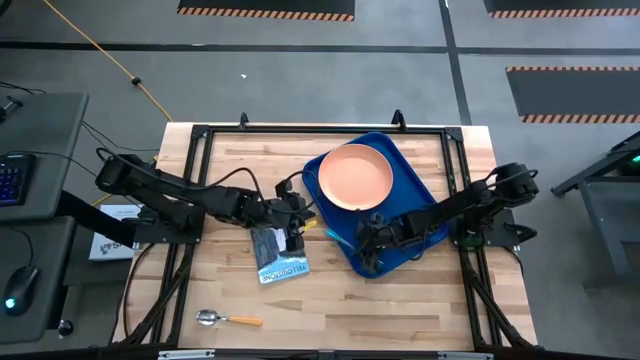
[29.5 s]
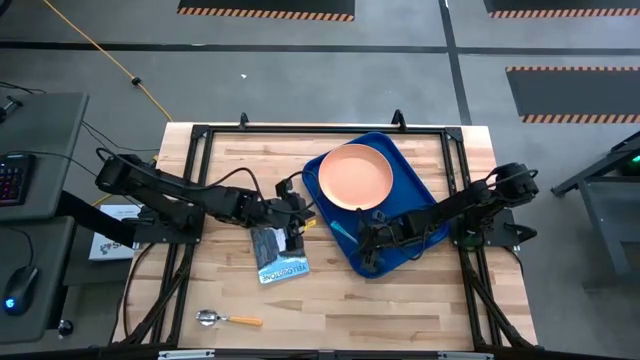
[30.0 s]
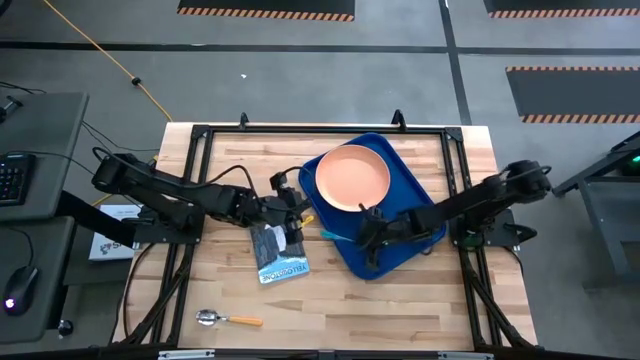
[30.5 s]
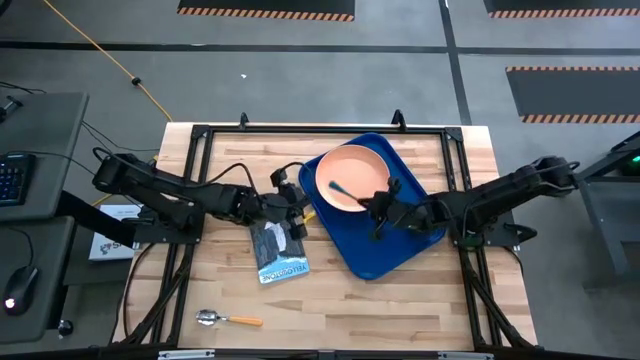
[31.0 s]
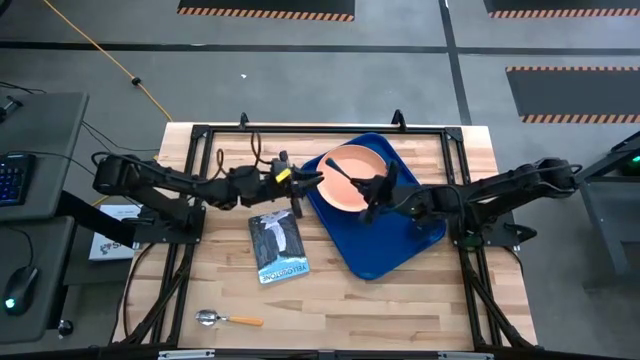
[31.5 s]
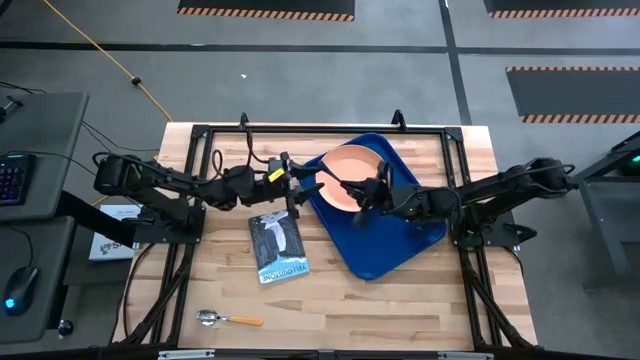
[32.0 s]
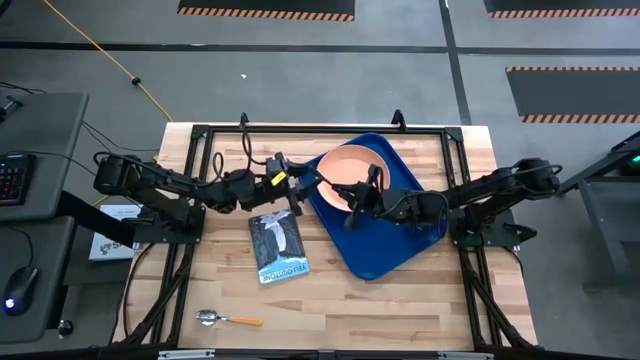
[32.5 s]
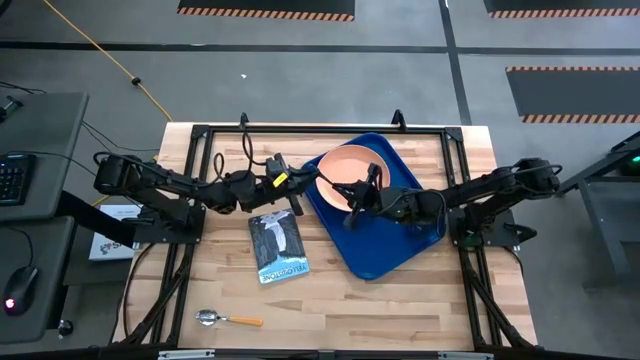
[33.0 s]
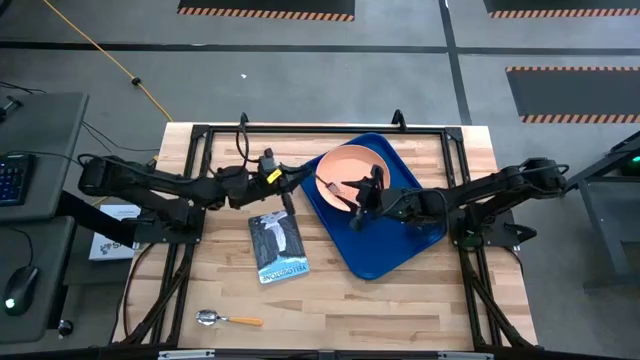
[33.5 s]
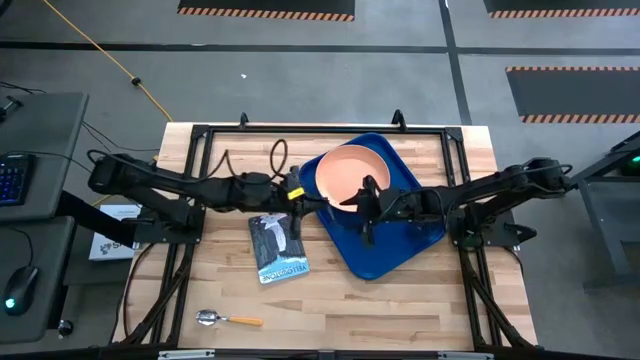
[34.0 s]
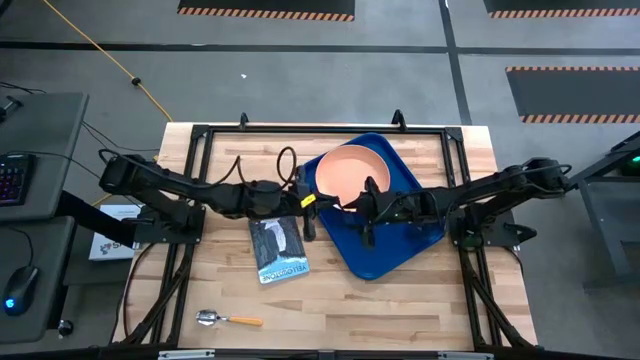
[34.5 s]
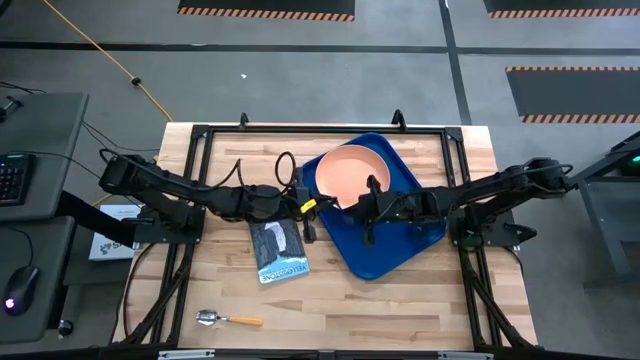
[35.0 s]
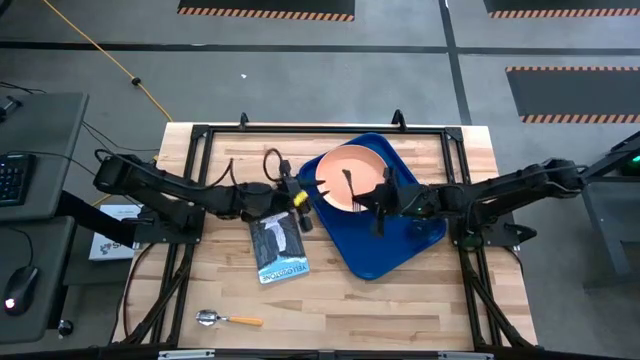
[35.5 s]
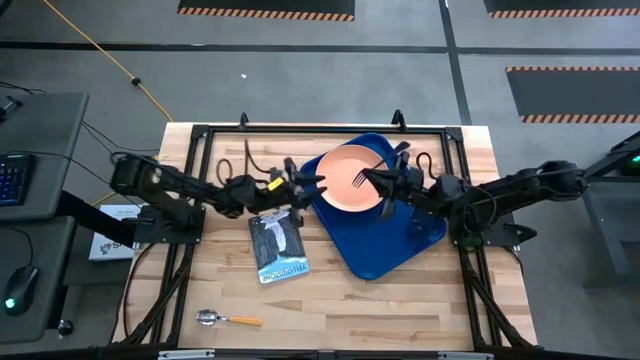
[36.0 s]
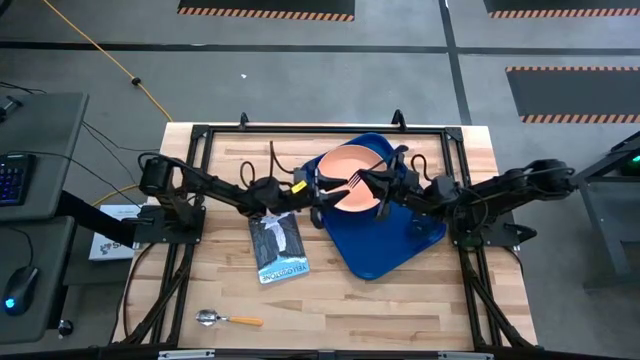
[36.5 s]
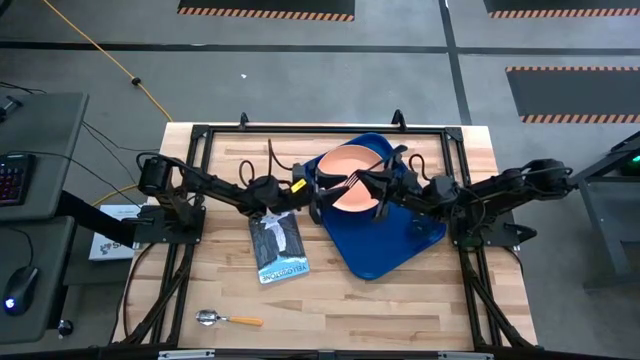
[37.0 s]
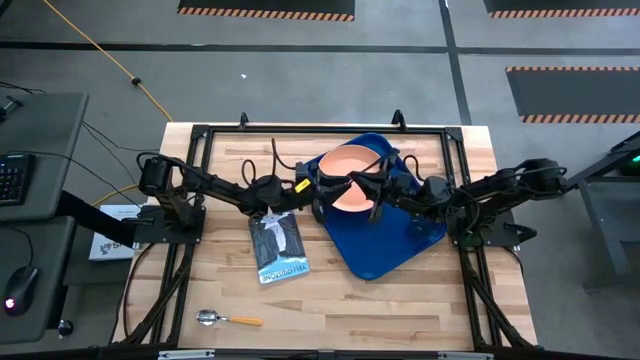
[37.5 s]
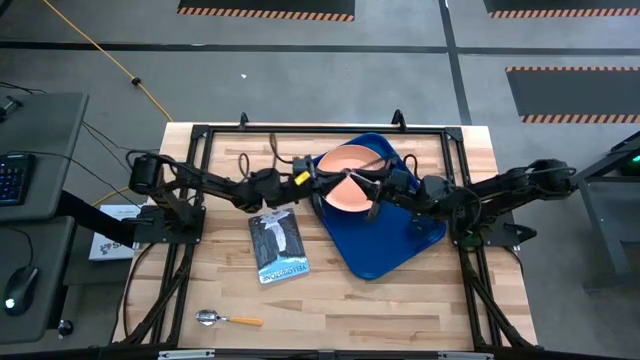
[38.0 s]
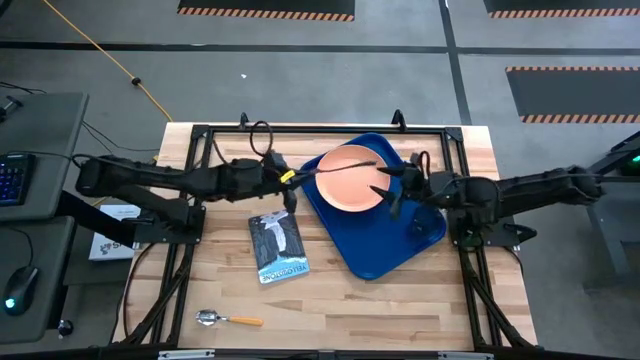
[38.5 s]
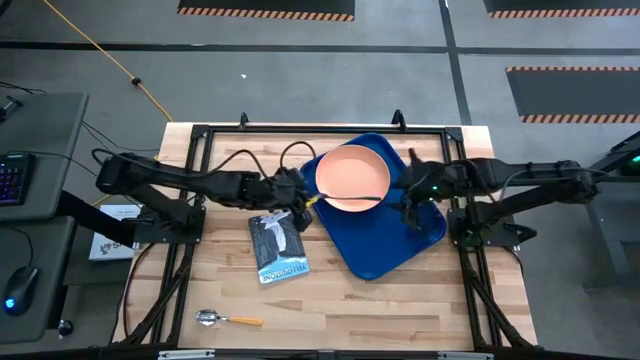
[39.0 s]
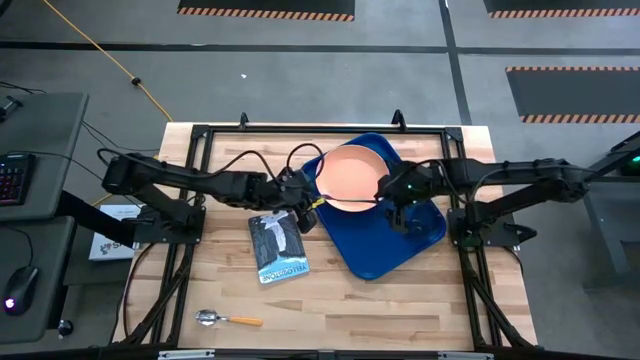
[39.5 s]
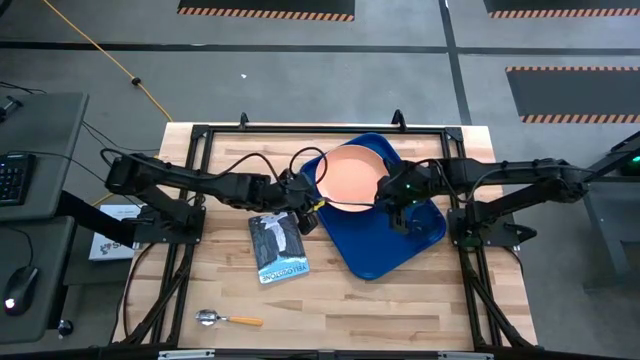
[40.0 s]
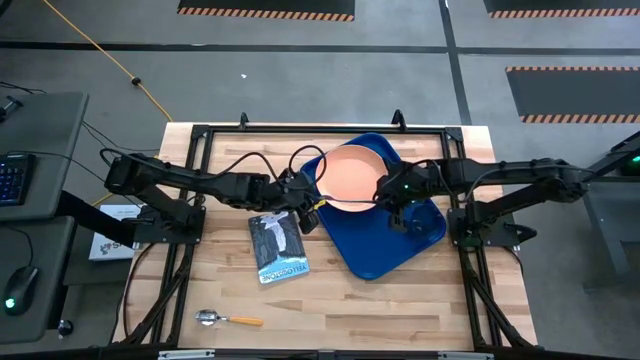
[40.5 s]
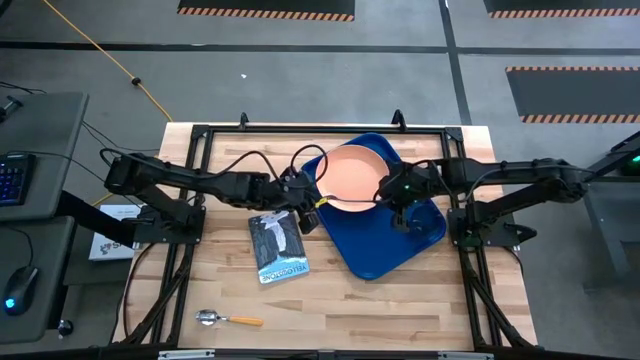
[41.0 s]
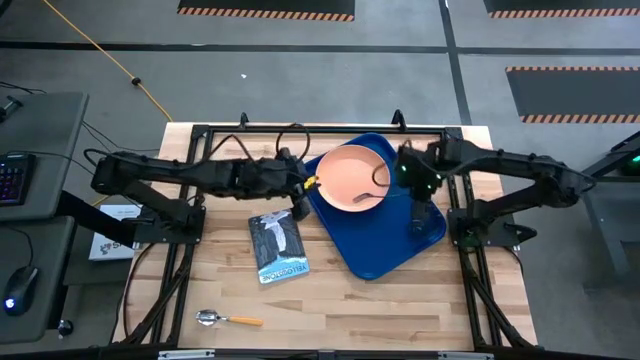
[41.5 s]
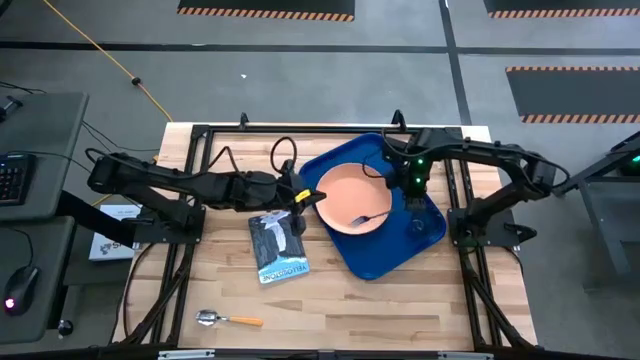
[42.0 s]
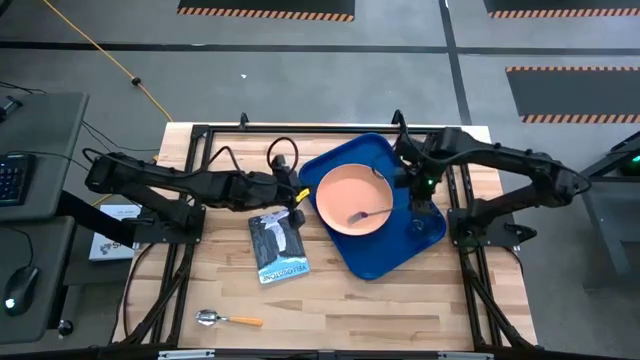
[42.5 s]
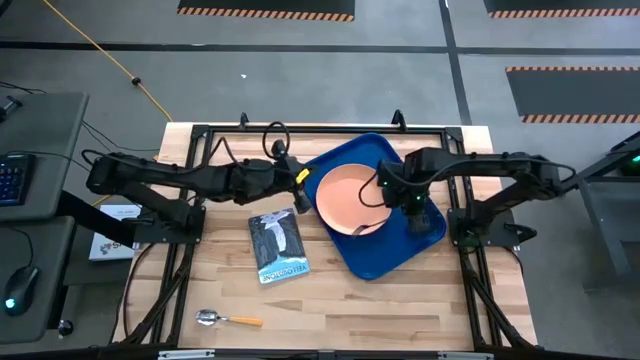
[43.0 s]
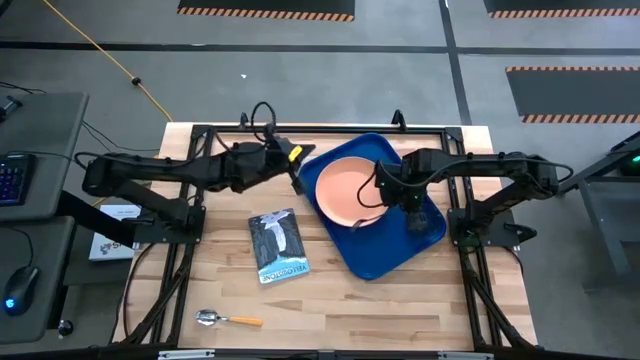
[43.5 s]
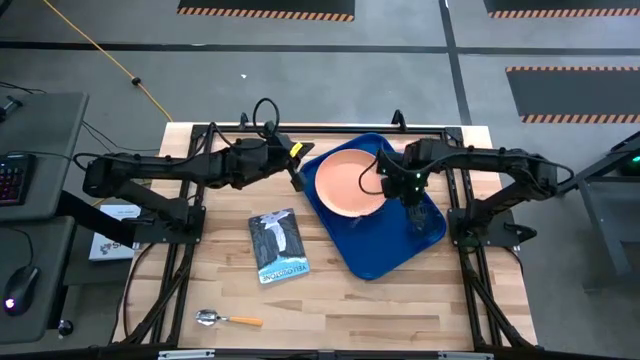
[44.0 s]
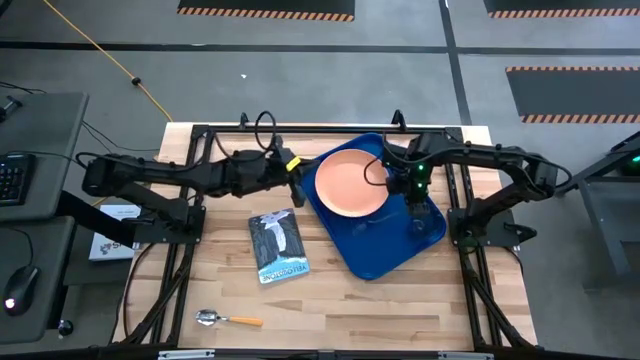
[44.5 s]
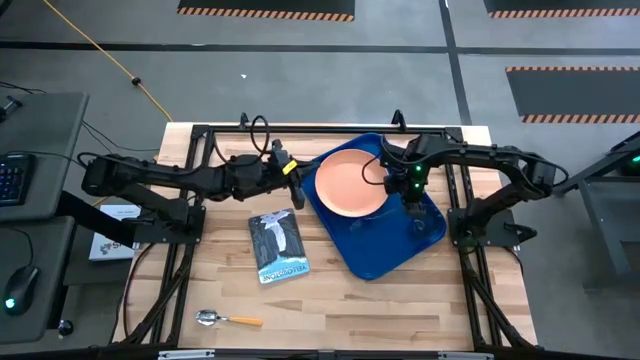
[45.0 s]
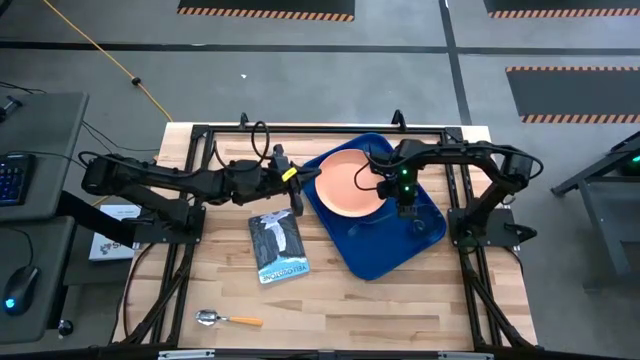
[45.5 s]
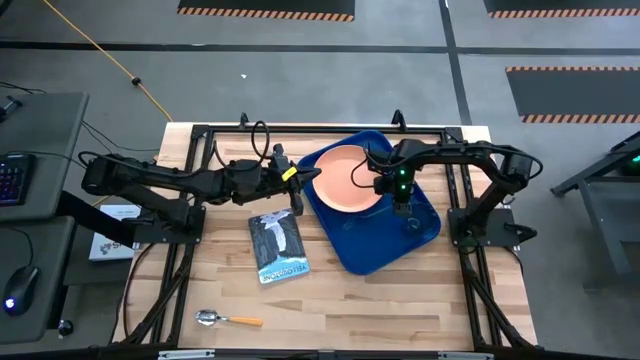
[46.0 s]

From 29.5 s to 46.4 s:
Task: Pick and place plate/cup/fork/spoon on tray
Put the iridescent fork on the right side of the brown plate on the blue tray

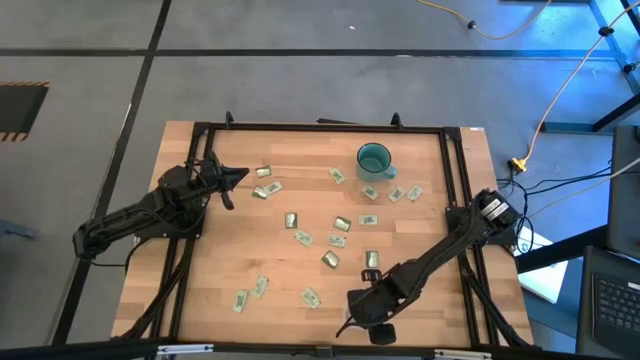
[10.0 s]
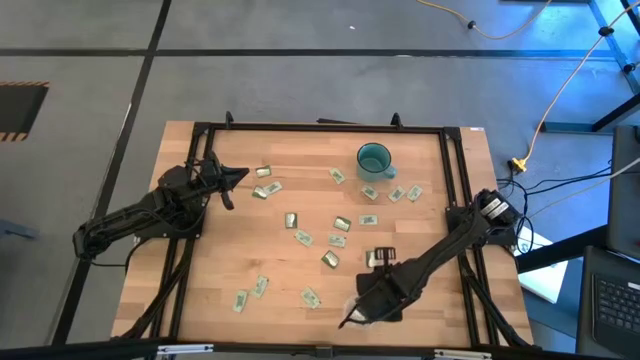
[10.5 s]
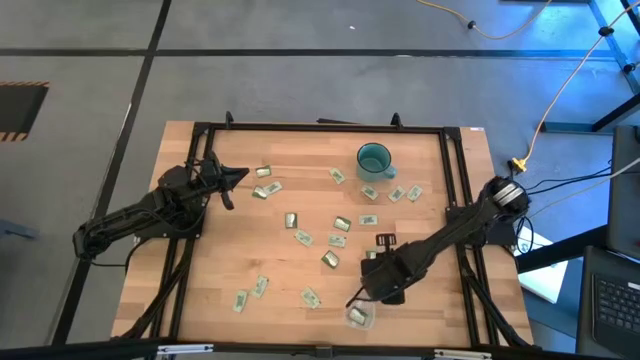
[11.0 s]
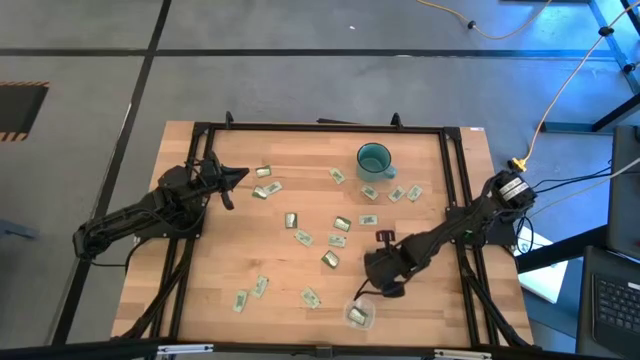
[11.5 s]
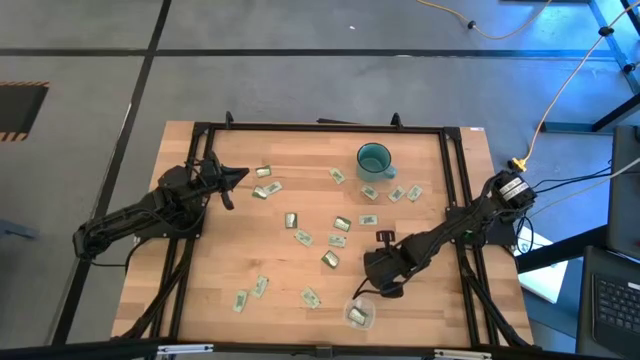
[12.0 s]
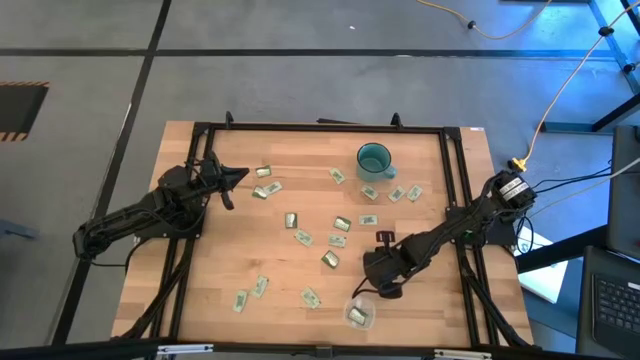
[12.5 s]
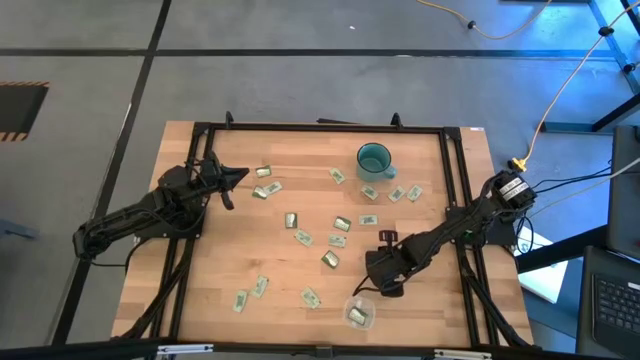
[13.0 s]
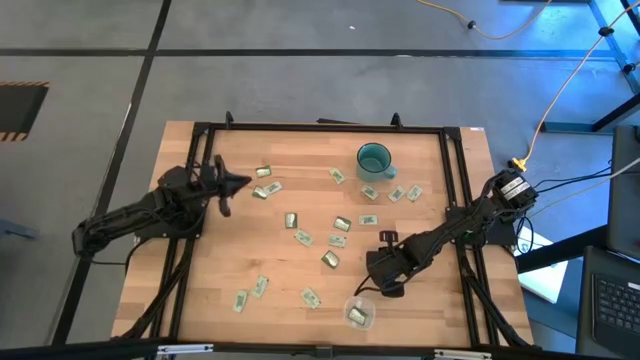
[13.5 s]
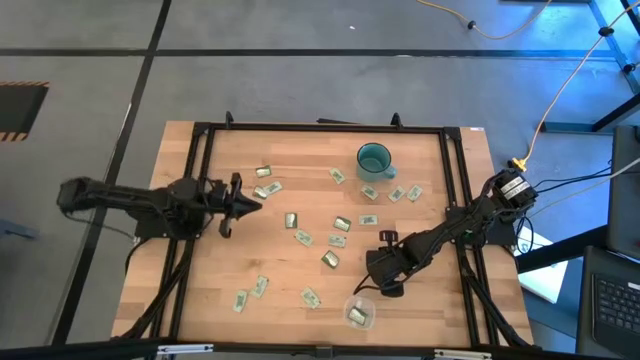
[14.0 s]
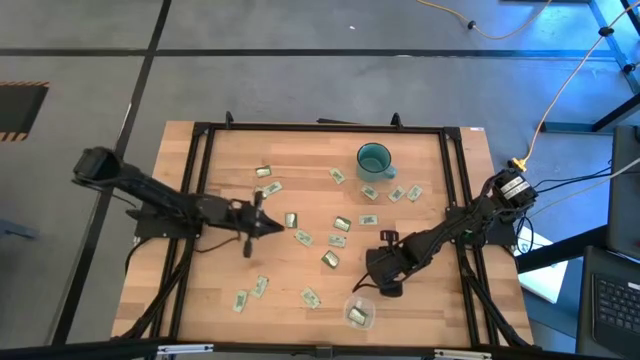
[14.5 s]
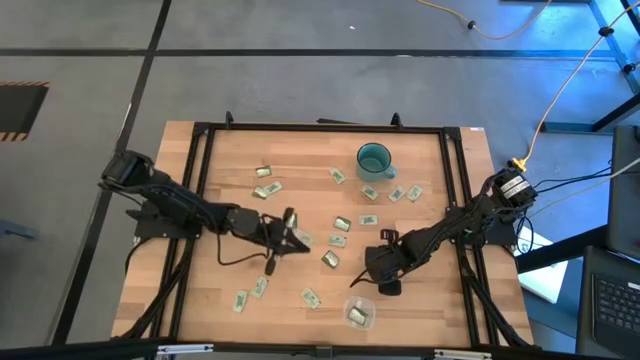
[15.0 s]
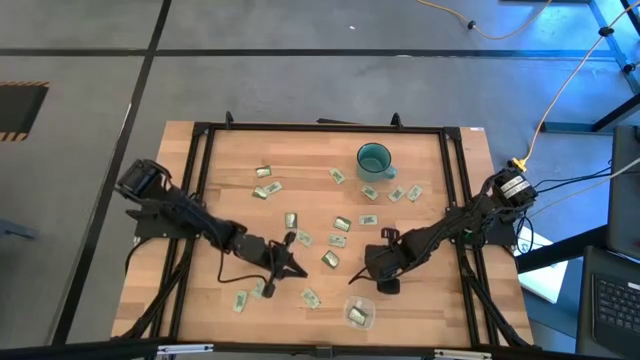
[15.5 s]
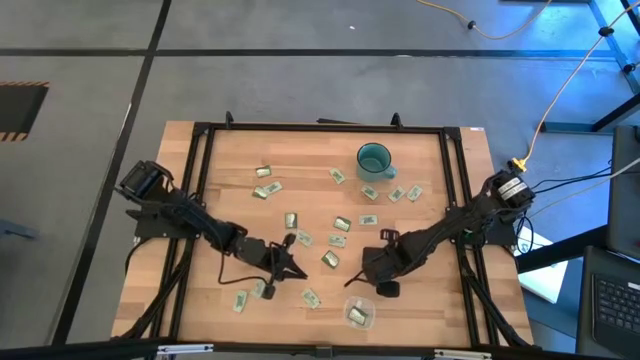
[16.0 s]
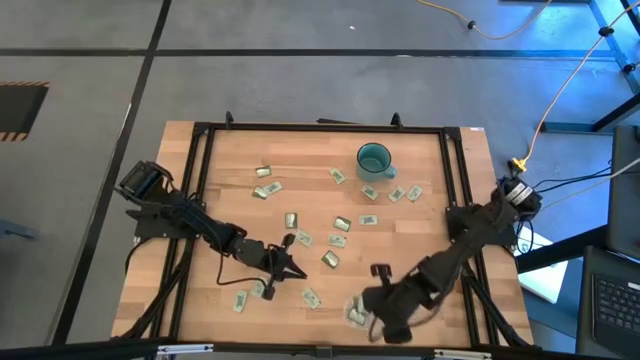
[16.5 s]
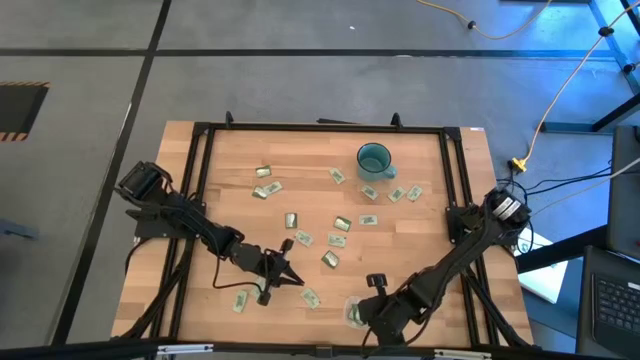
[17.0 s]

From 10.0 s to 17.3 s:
Task: Pick and place items into bin
Put the green truvia packet into the transparent bin
